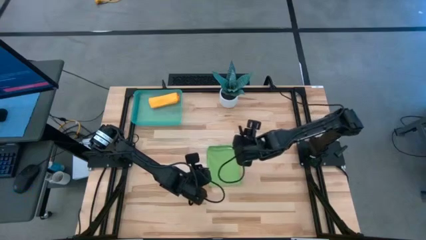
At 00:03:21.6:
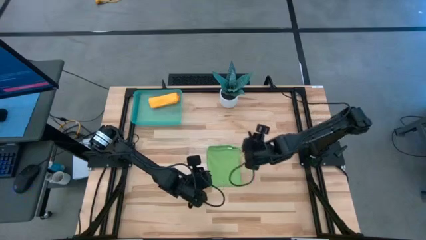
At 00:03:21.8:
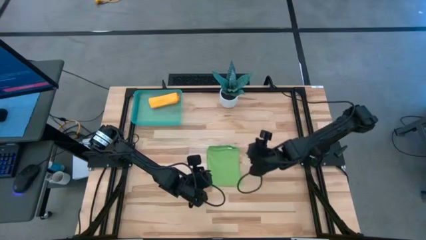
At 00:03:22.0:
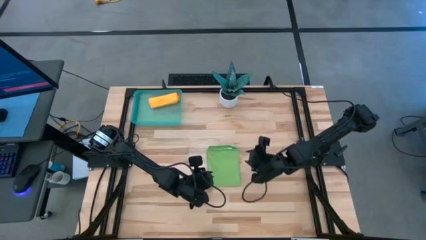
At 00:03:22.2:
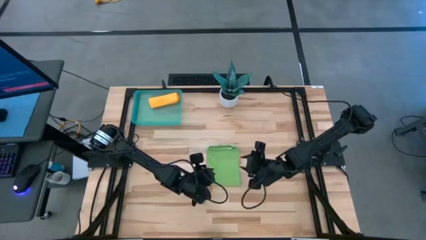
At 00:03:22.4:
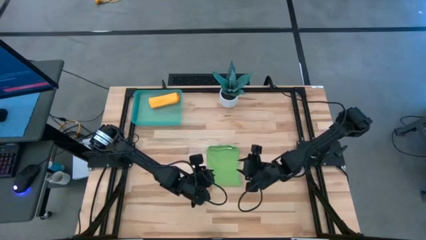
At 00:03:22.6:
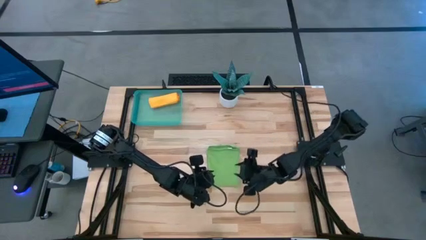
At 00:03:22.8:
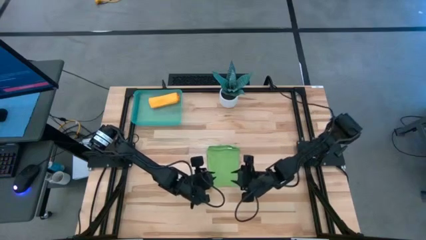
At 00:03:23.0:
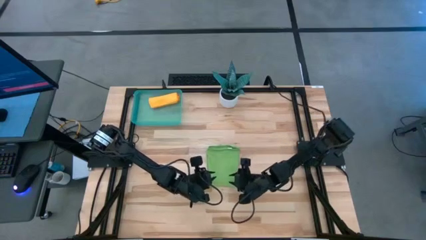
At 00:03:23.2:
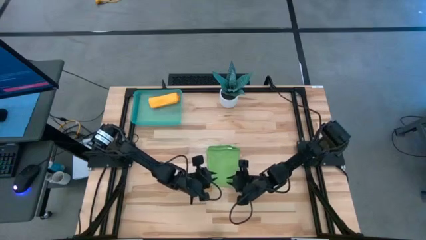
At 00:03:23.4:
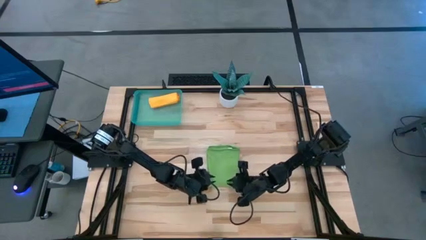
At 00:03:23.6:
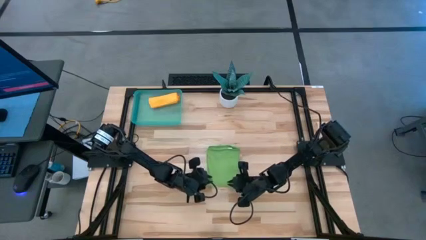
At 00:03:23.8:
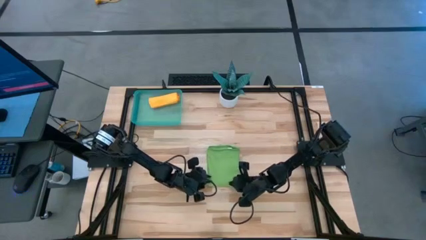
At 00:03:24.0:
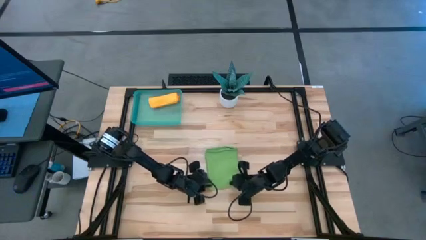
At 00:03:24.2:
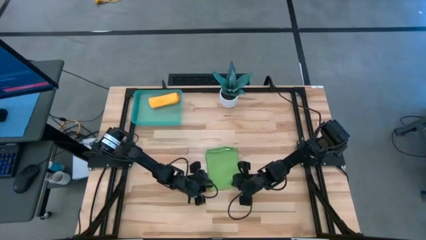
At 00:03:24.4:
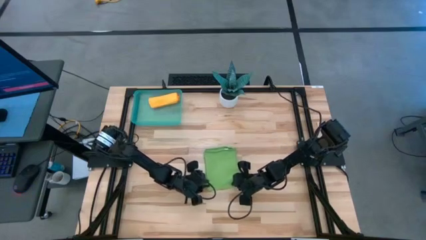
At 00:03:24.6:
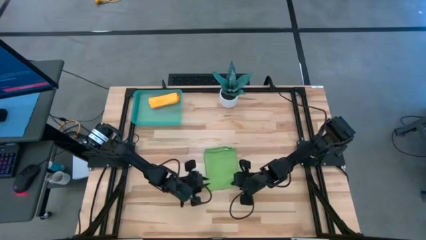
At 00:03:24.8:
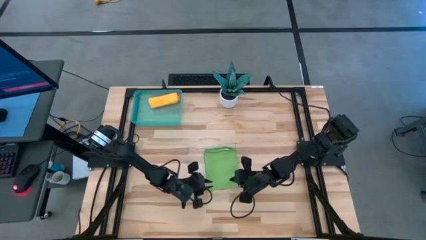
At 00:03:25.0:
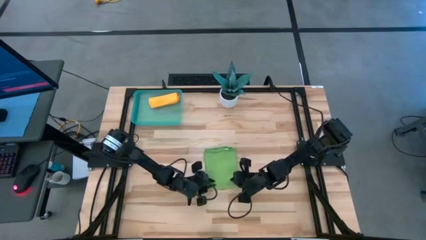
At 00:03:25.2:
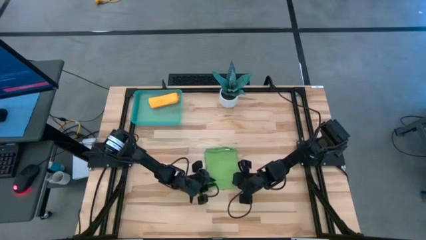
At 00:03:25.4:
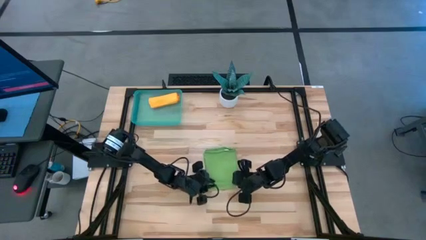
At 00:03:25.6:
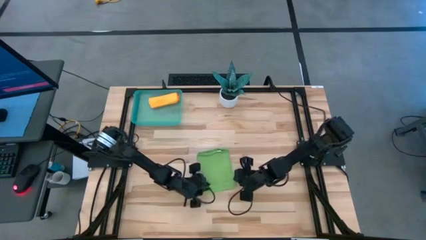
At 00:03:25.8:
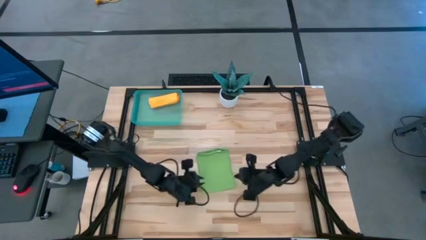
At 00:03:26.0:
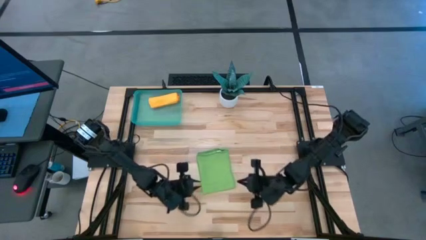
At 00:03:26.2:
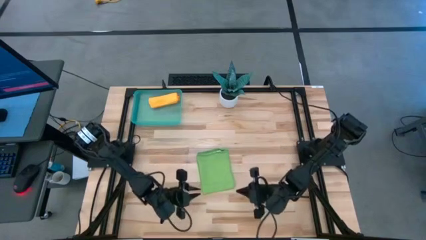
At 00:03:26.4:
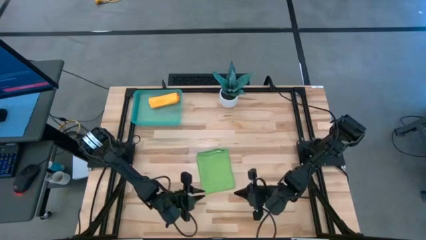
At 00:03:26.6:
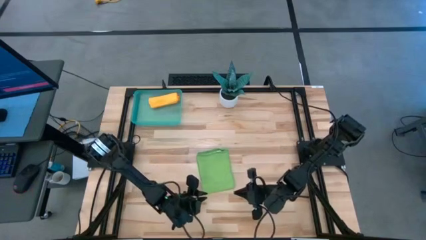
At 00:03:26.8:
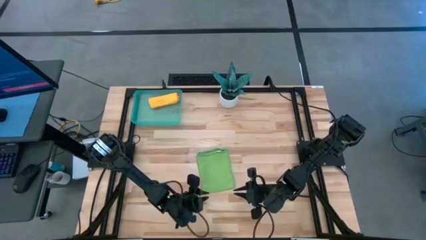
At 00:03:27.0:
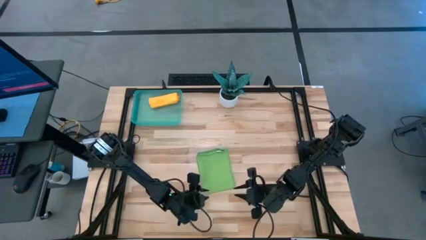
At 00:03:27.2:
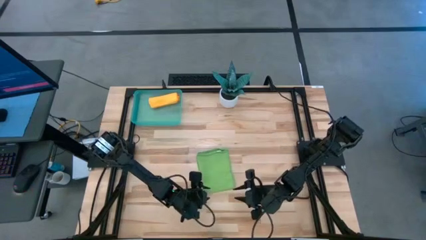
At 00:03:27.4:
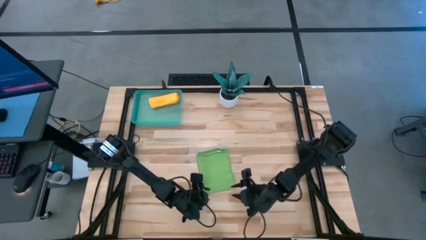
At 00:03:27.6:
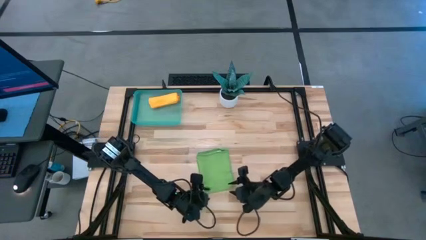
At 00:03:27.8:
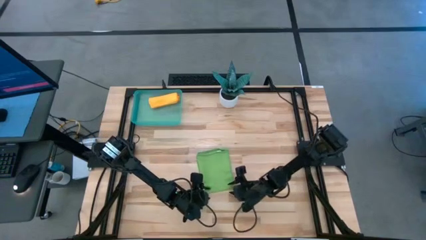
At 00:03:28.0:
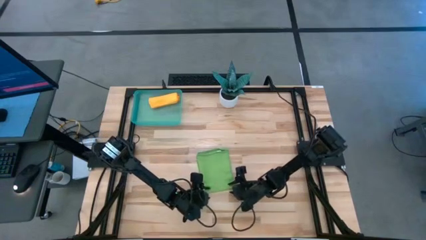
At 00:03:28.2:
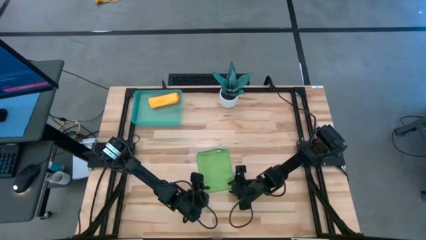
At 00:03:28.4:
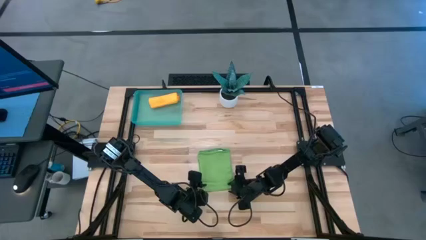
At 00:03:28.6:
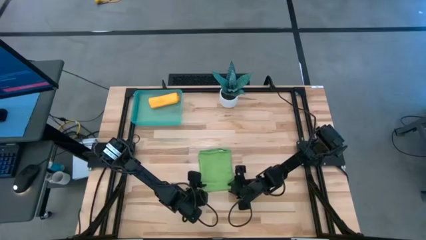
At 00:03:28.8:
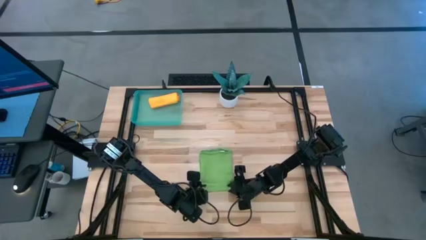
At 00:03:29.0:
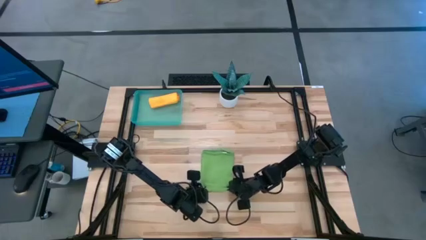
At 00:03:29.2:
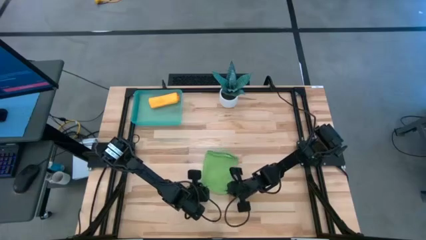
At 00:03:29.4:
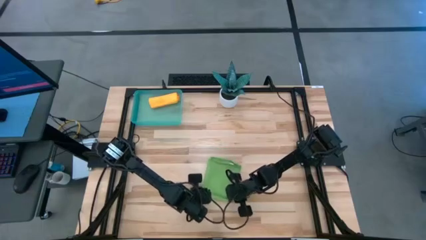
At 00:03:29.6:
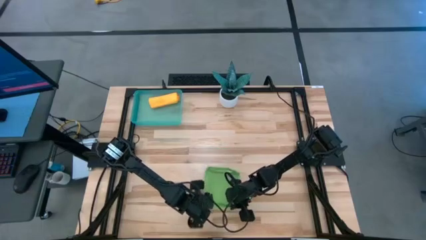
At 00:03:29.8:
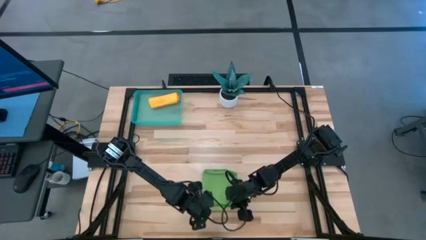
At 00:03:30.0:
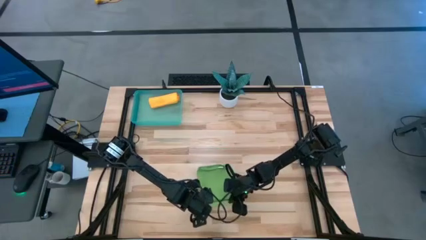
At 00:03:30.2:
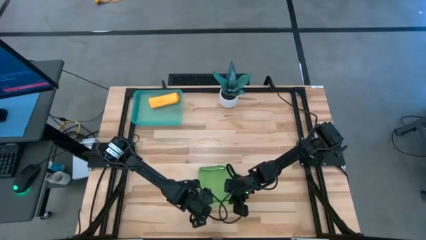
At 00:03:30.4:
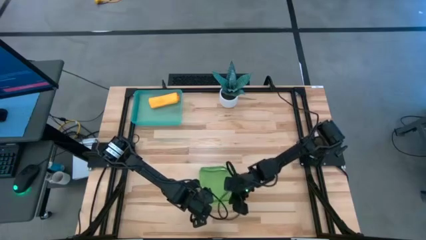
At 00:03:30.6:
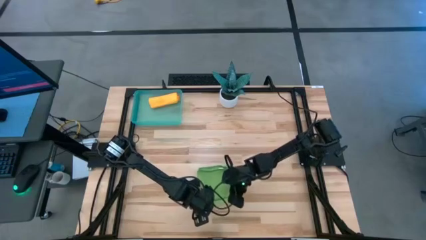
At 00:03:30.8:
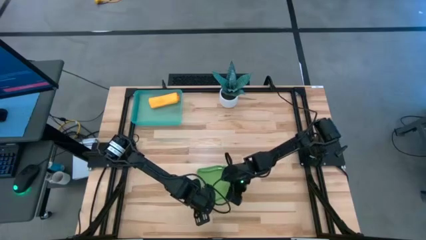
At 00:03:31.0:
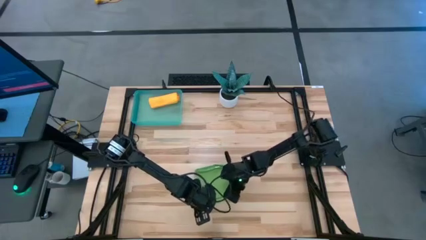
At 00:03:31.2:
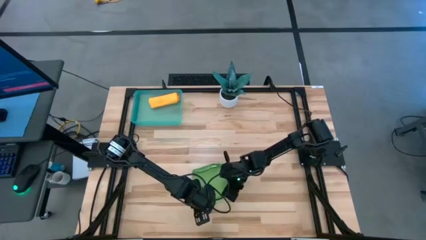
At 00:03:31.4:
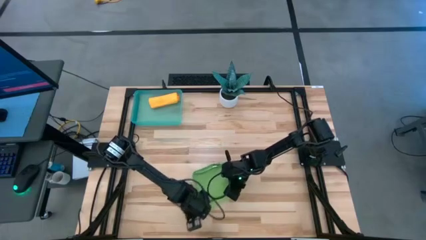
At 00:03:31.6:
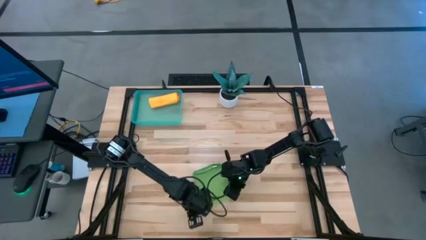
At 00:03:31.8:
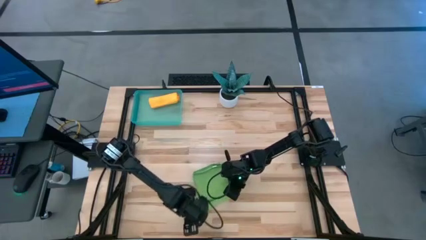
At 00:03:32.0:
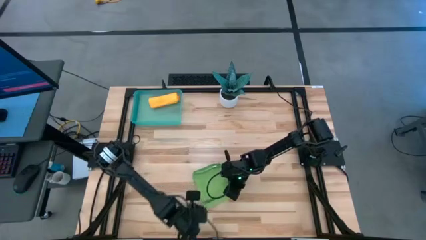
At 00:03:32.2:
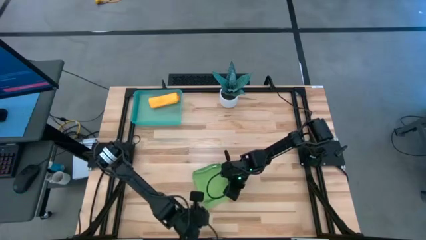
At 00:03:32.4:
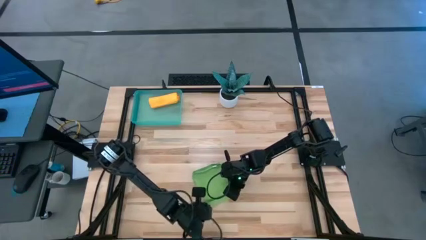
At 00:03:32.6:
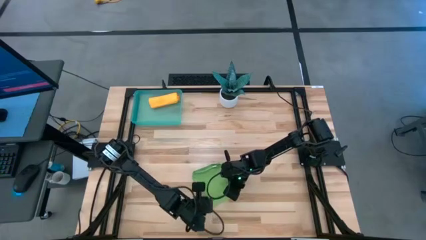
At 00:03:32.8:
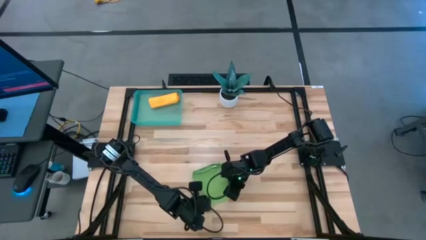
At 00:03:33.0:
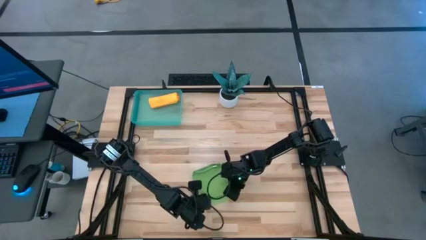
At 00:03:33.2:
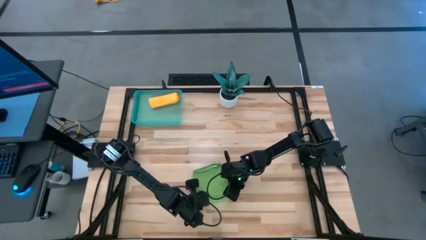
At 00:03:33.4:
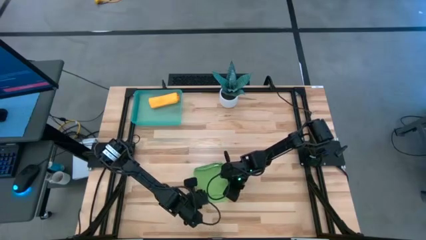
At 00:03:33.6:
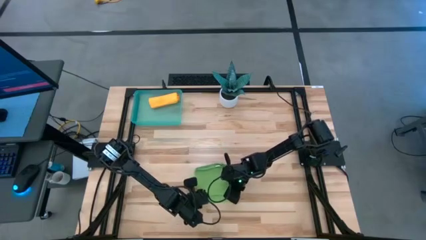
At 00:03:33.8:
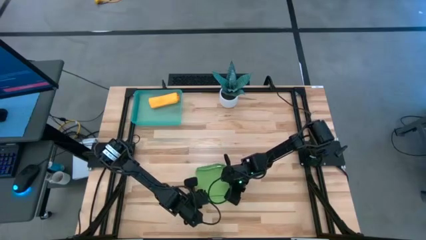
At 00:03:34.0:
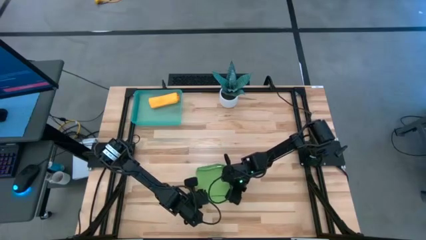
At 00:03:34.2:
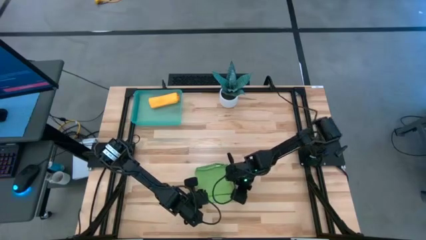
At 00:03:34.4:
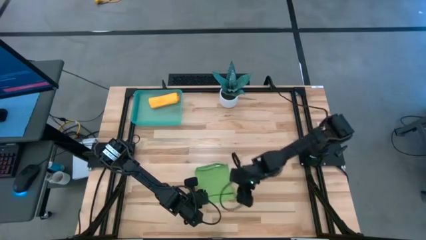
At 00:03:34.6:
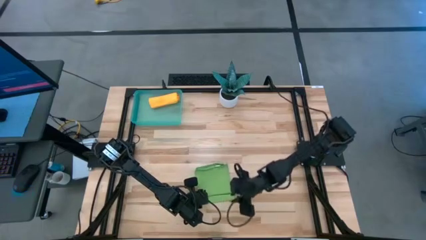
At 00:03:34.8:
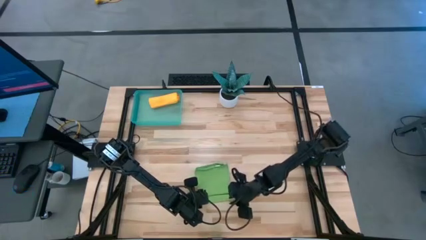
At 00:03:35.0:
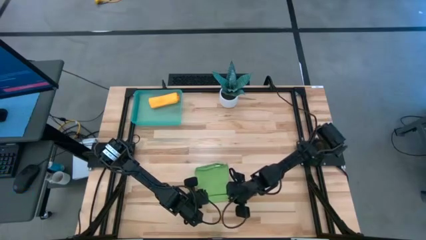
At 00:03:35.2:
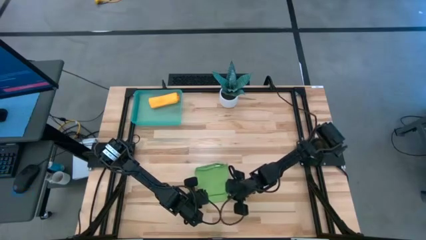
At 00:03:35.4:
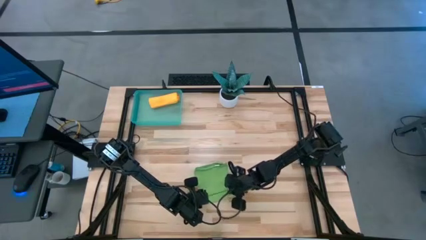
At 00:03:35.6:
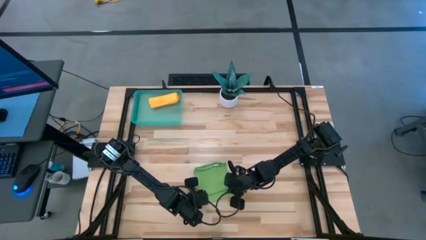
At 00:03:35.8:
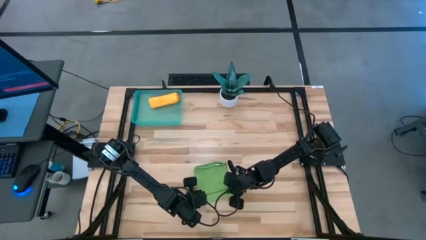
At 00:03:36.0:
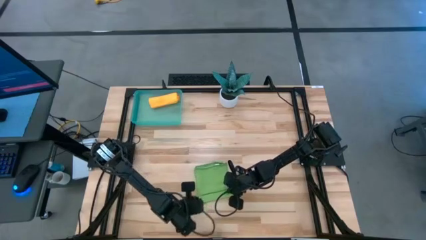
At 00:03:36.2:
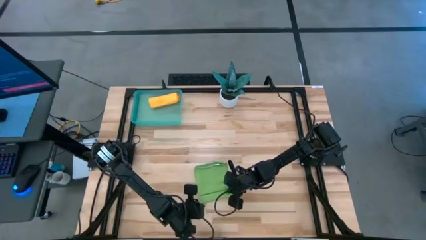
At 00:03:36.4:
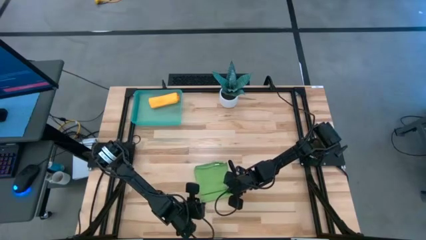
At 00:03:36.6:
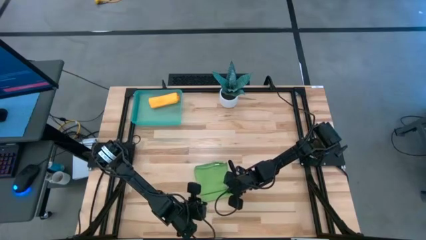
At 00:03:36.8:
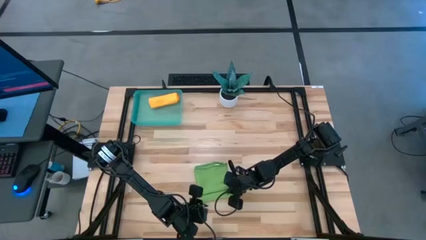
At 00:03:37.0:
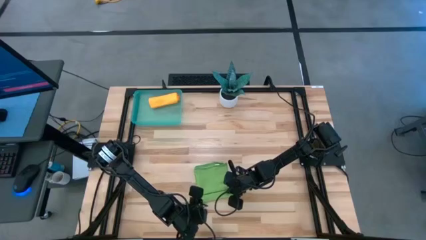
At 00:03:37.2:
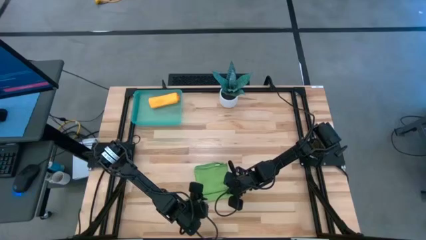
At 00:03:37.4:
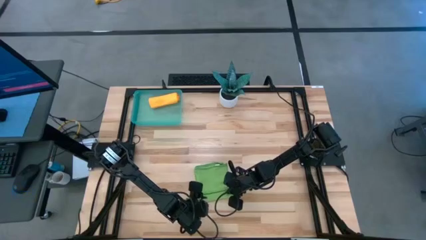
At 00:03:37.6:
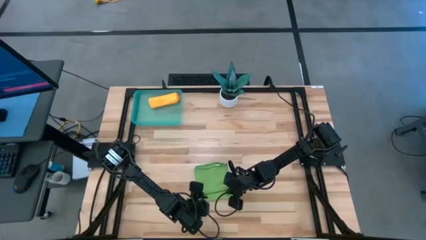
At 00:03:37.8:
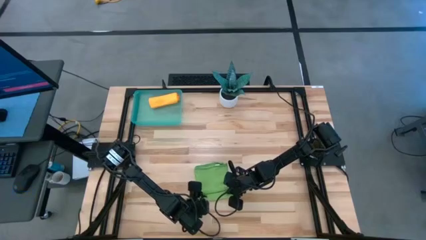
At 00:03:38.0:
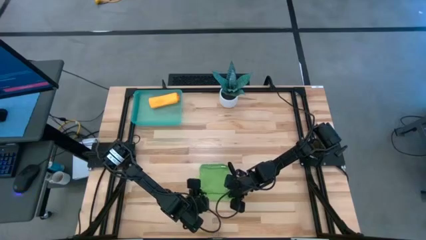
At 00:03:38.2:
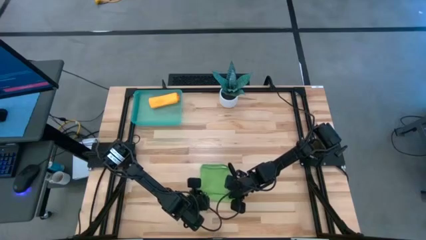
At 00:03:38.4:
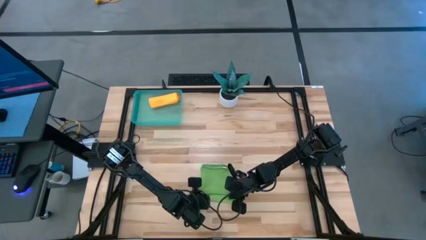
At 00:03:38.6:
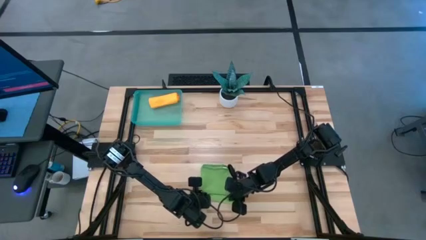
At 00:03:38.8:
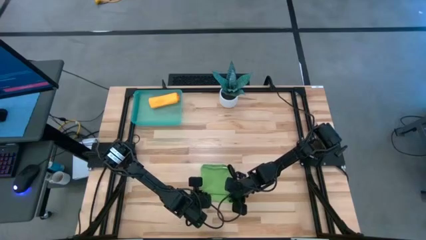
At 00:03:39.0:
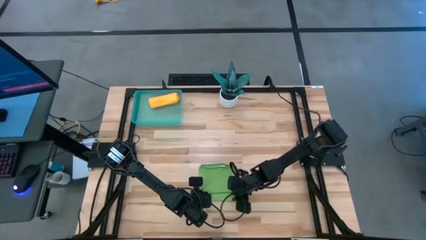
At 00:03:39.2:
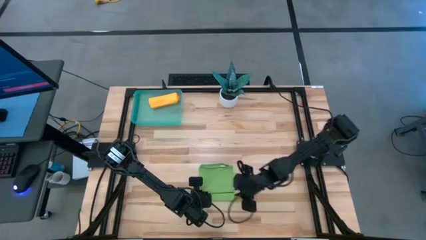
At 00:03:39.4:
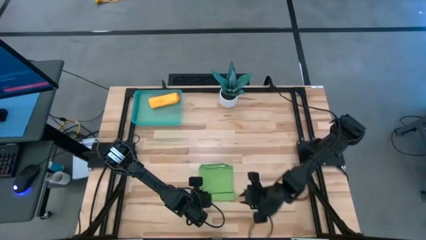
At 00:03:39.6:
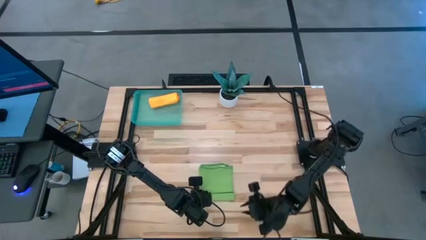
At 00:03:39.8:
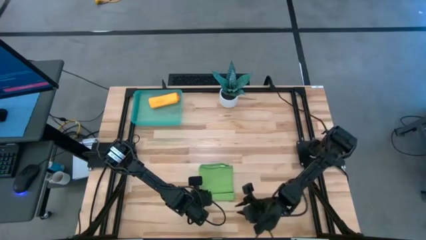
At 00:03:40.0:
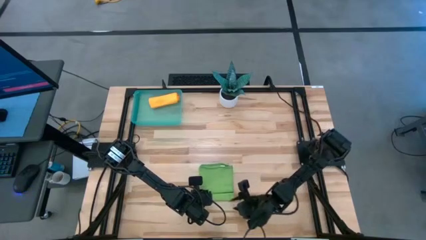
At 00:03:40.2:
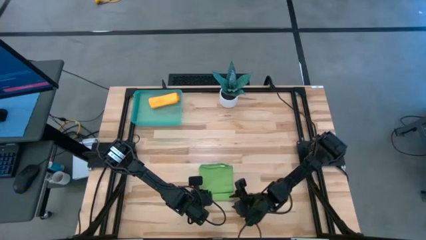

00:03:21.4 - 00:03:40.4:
Task: Roll microfiber towels into tight, uniform cylinder then place into a basket
Roll the light green microfiber cloth
